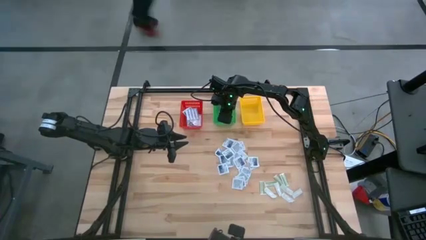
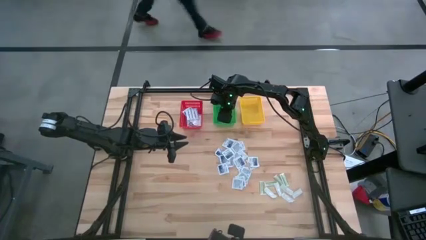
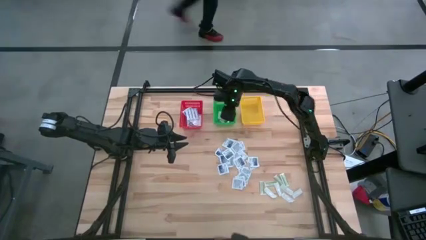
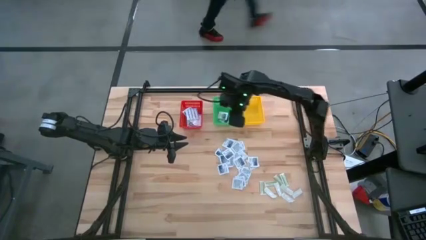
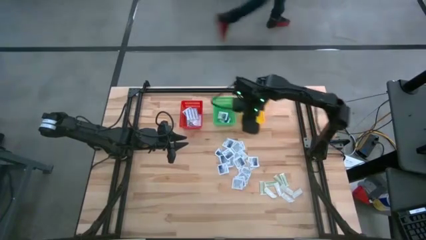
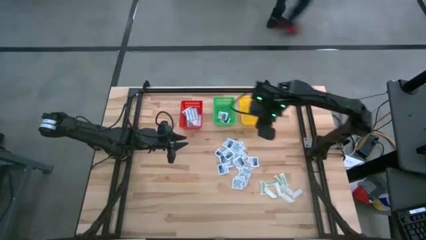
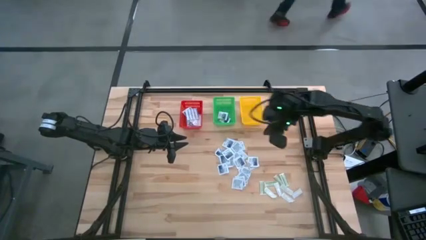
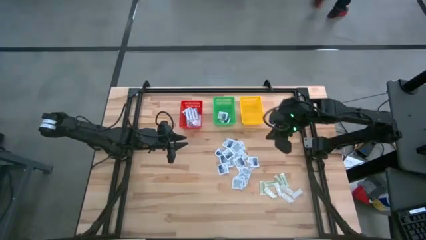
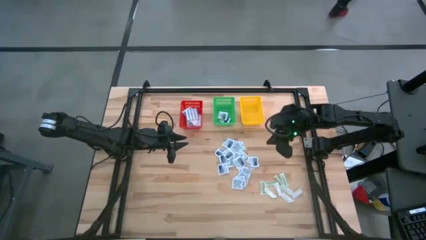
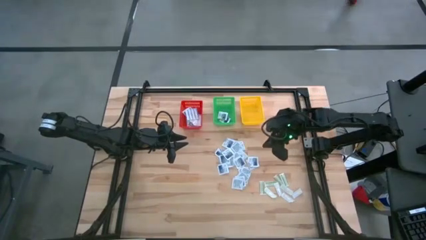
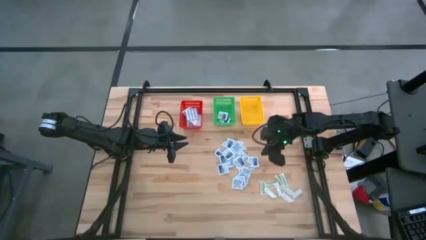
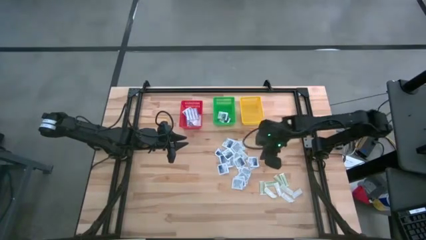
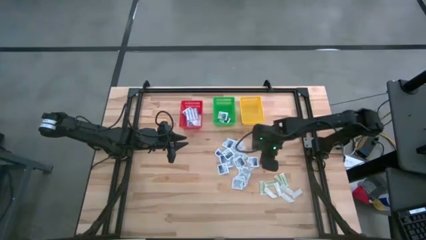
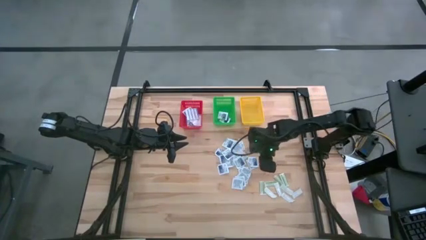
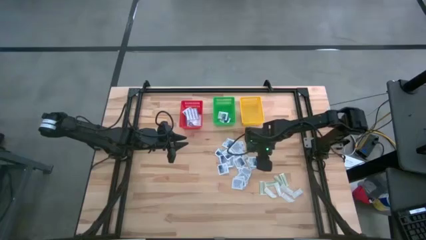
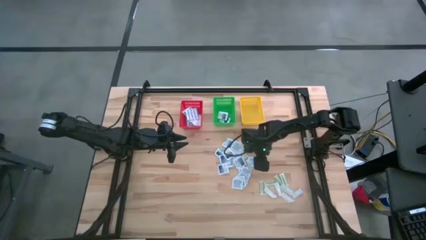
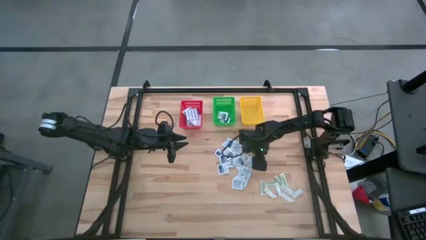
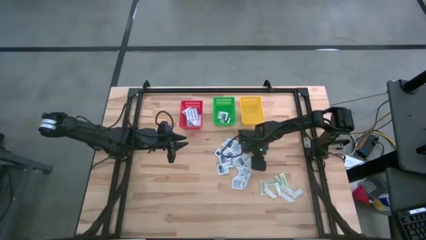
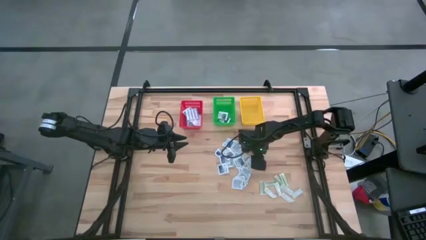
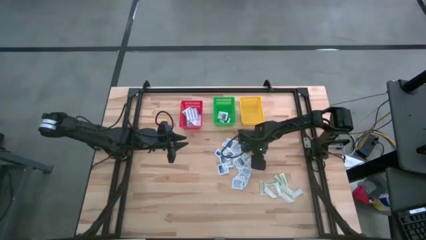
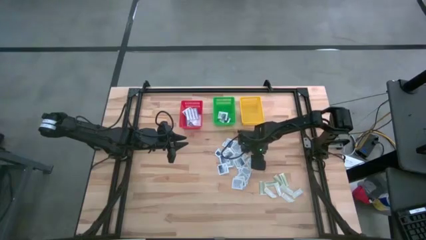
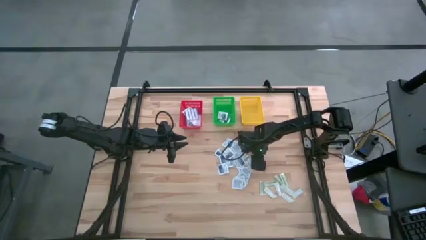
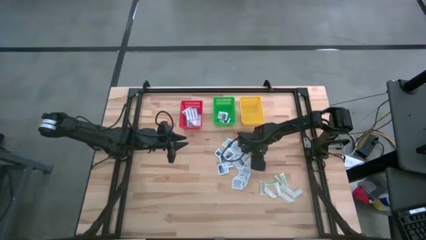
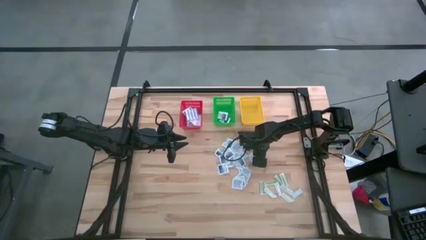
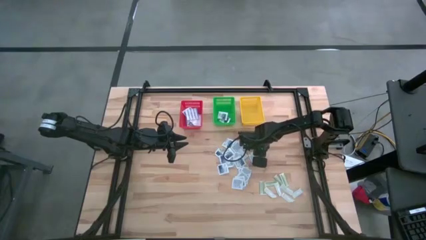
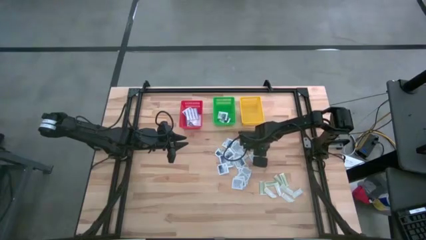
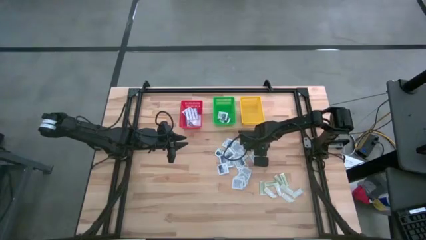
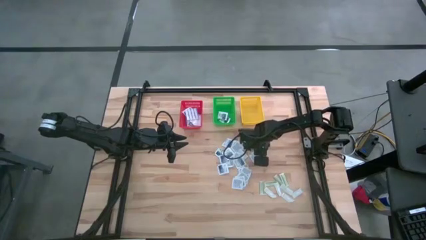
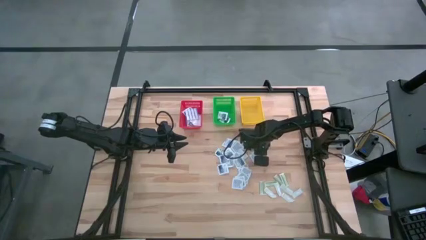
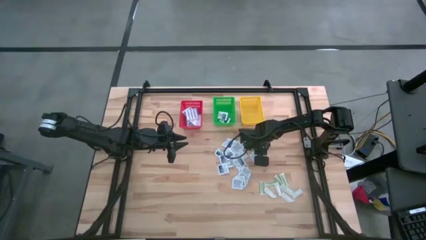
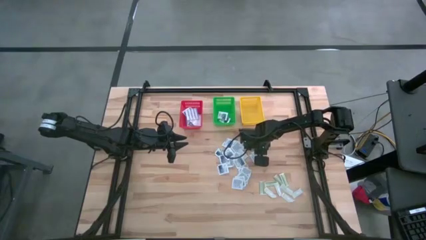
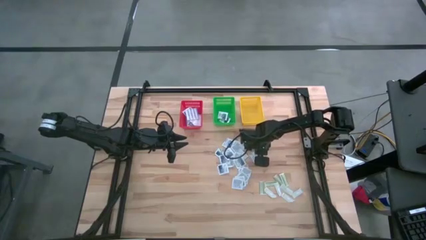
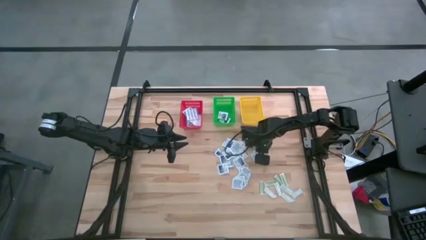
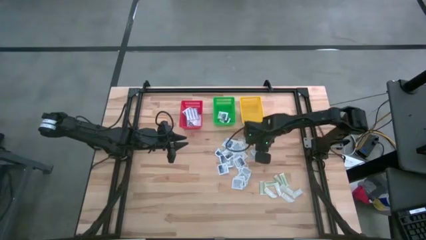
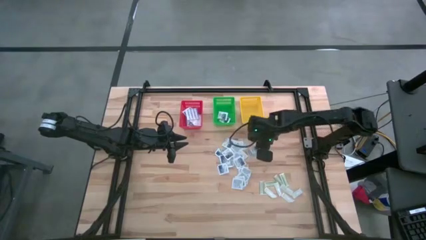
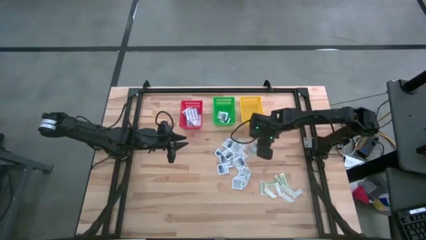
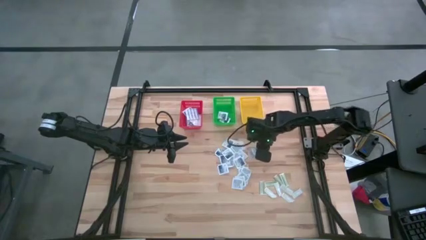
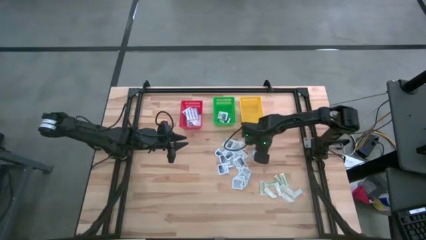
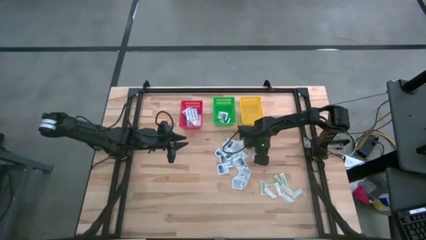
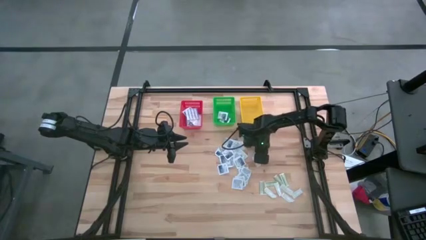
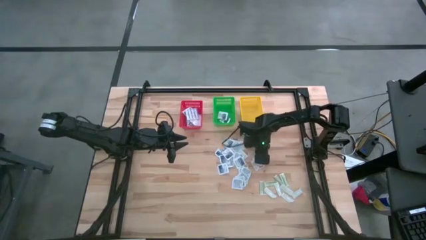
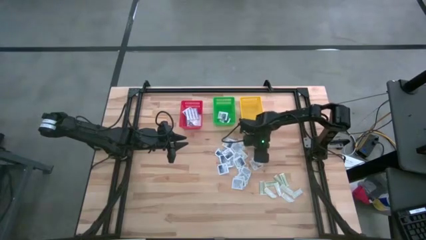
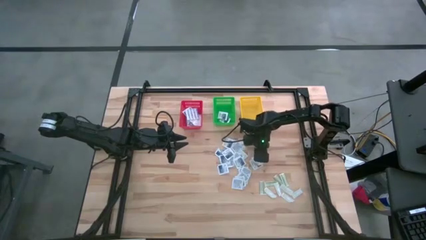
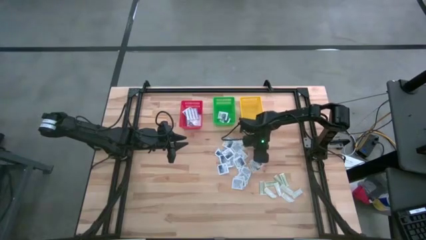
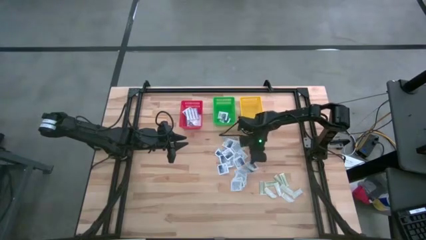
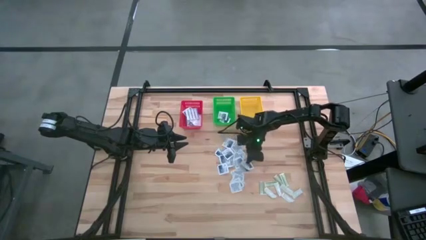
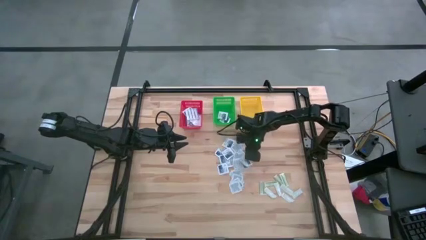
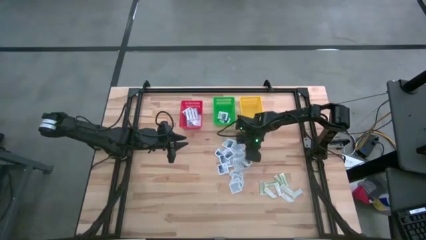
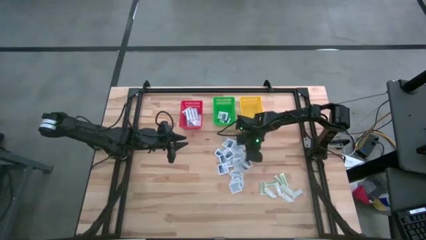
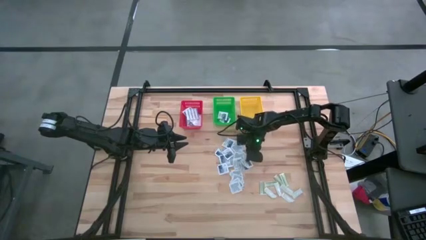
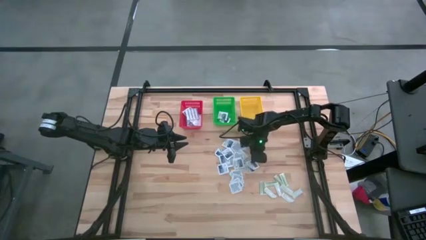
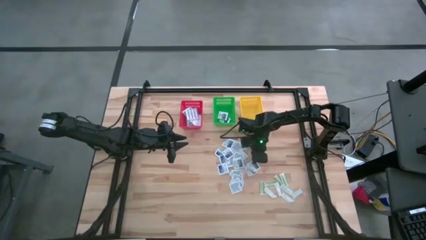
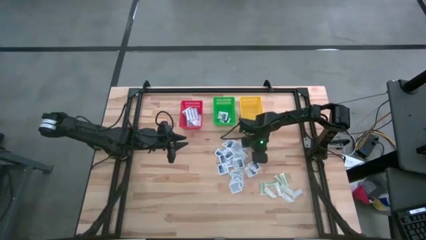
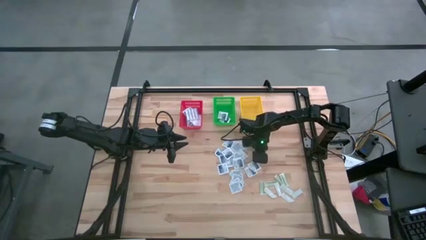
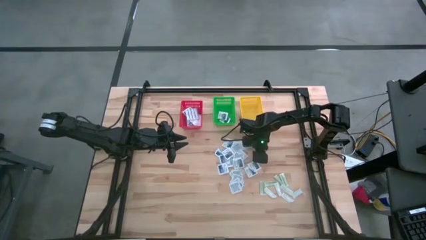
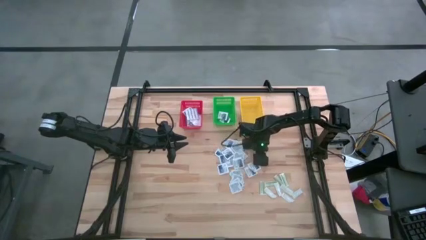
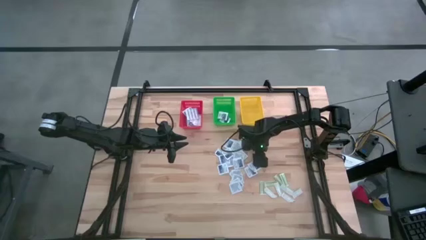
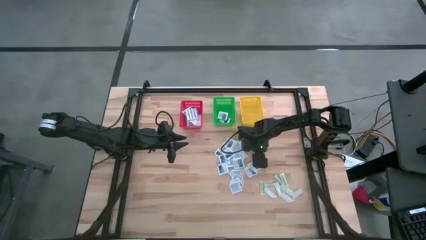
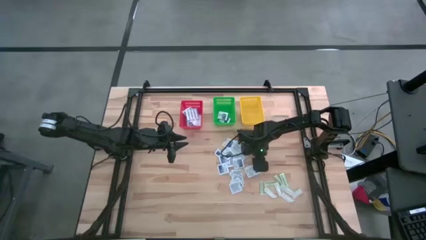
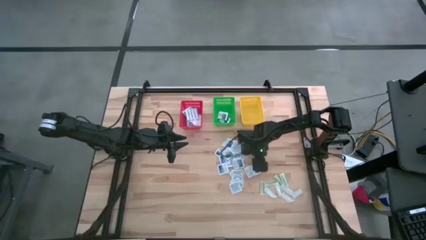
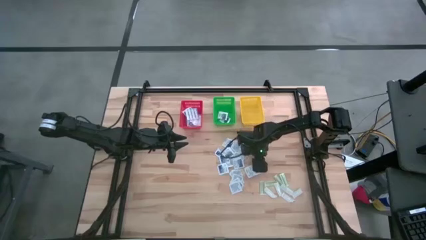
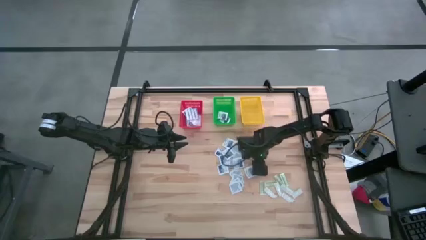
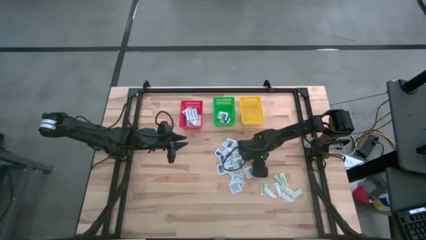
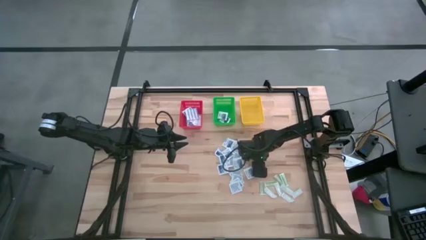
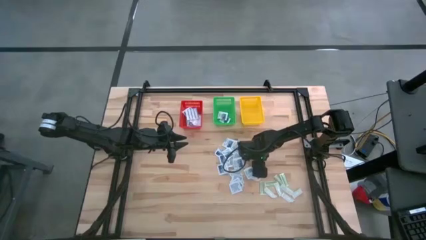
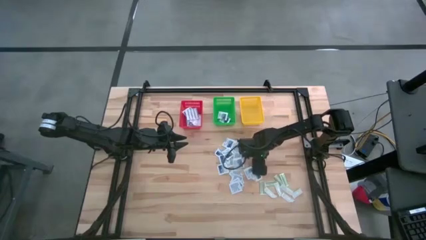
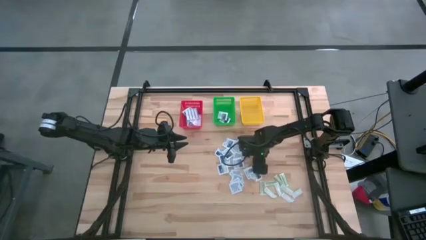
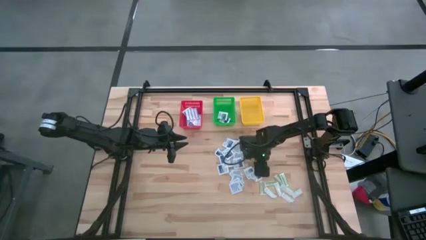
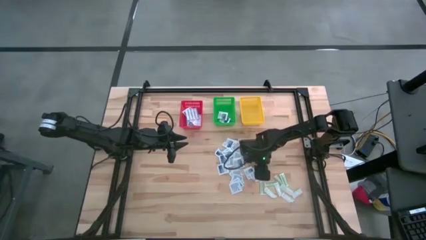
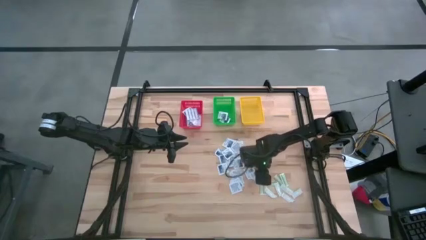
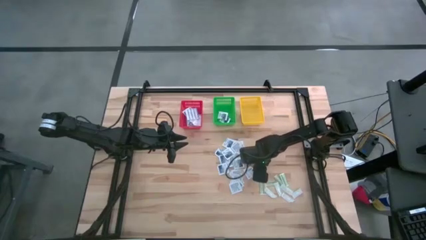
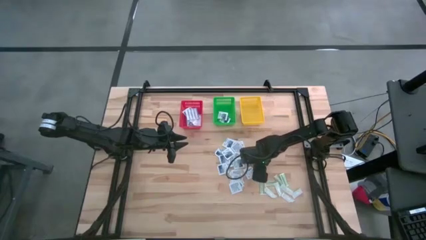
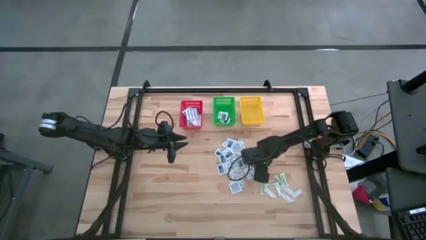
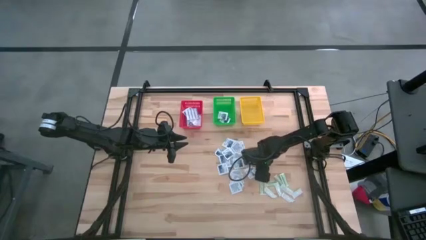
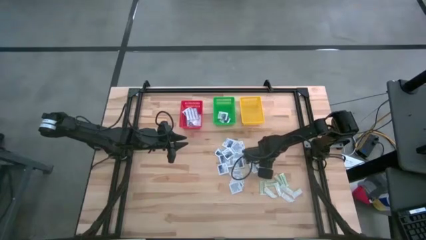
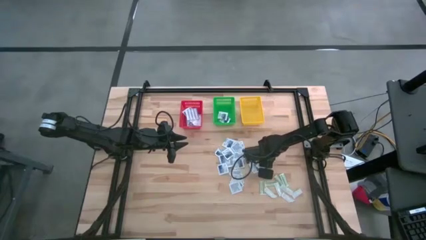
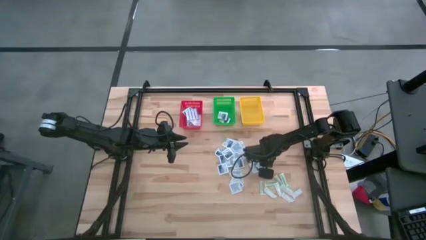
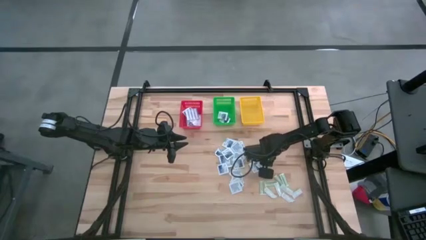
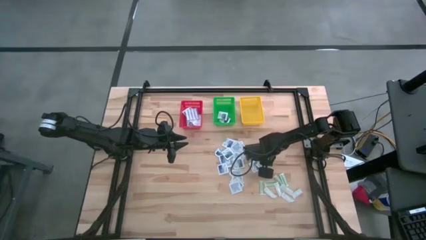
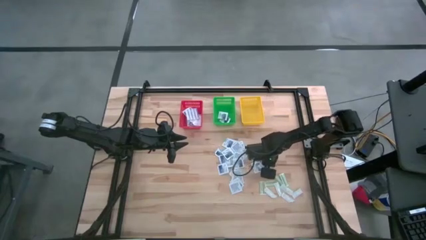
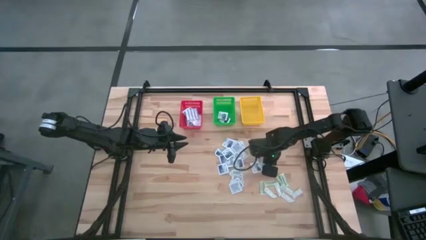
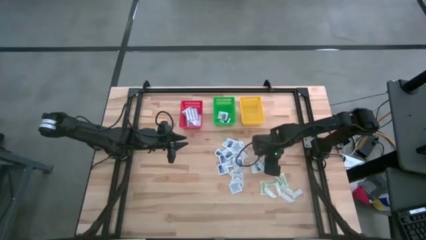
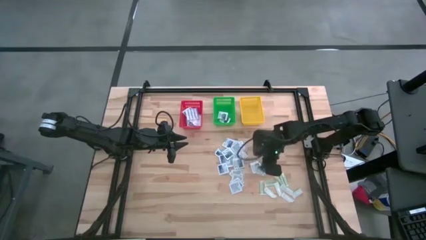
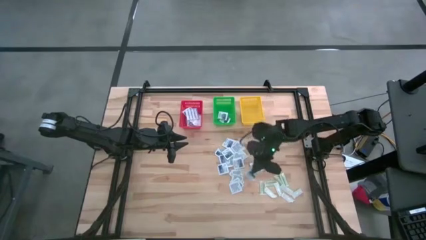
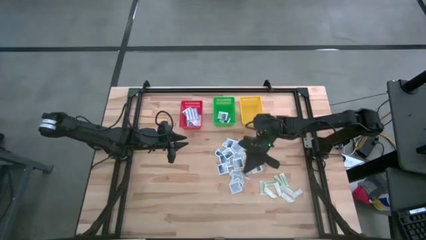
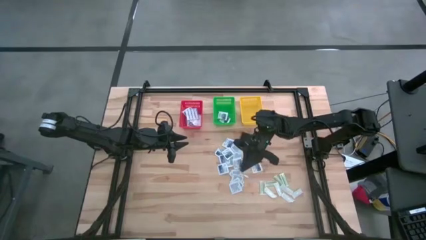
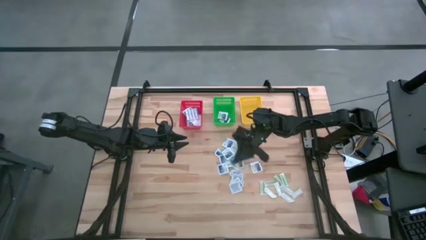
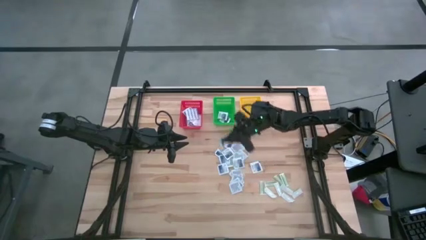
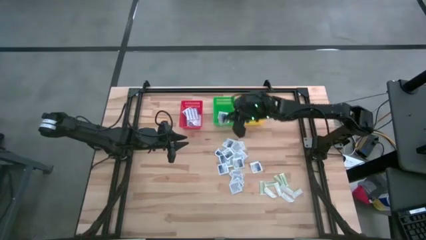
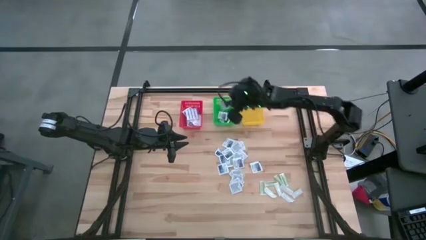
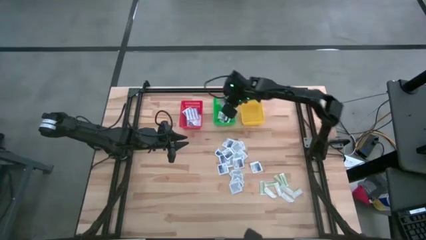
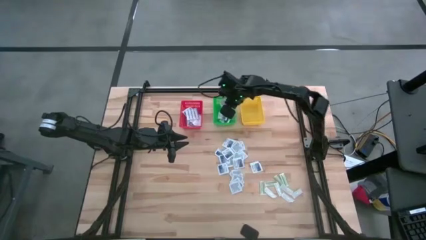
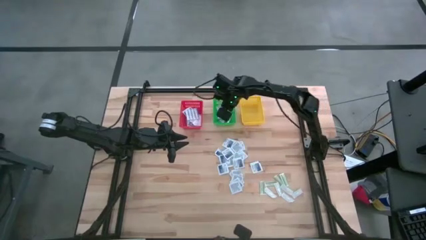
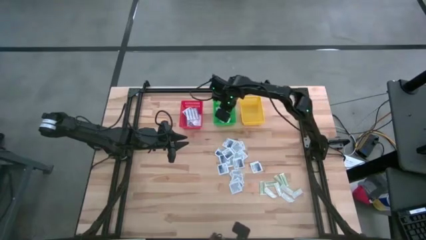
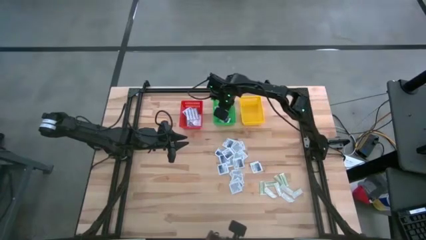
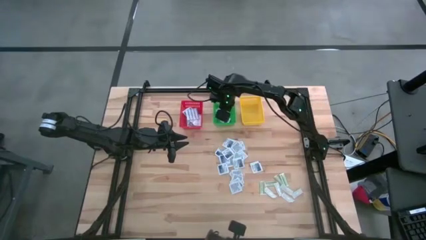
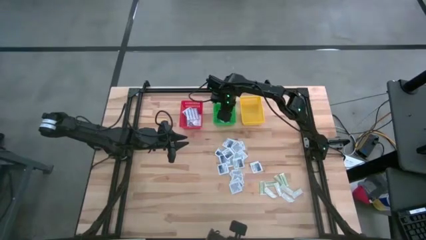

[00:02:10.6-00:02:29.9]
Task: Pick & Place First Aid Supplies
Put the alcohol pad into the green basket
